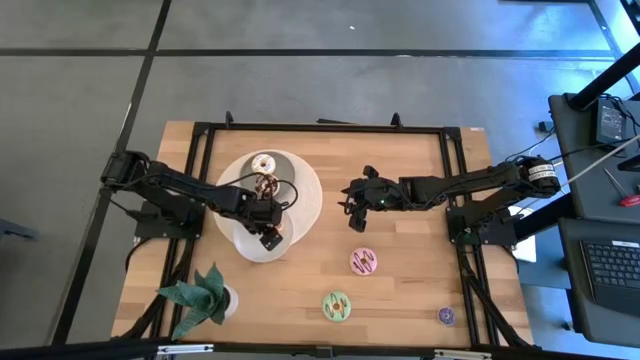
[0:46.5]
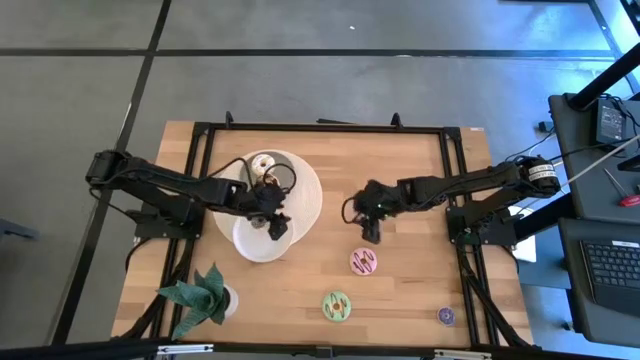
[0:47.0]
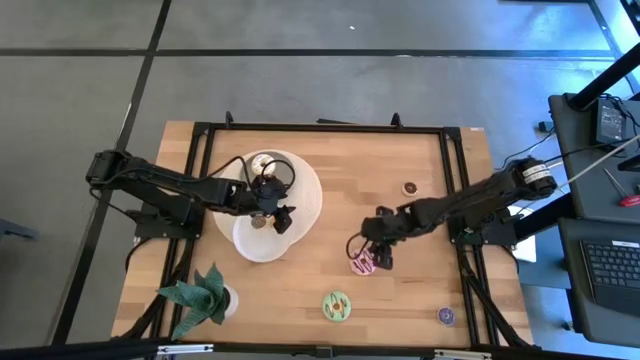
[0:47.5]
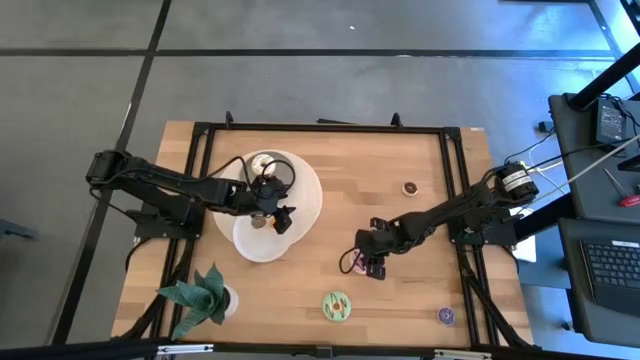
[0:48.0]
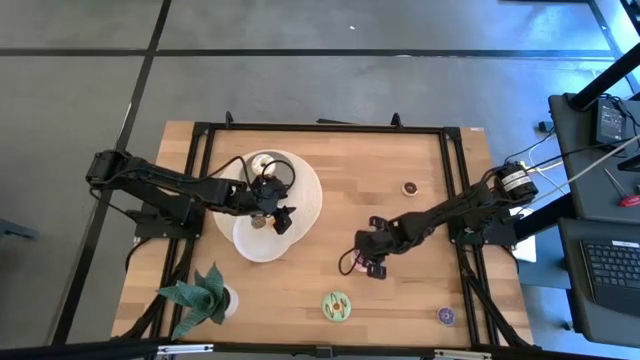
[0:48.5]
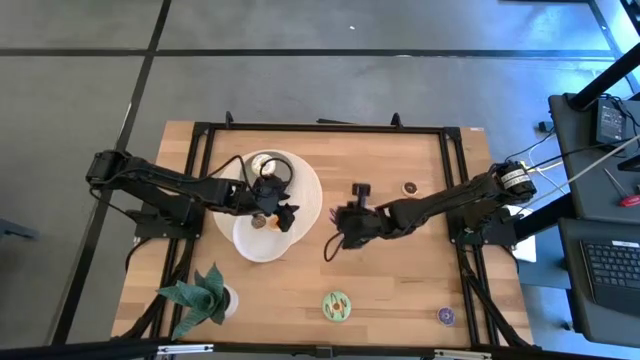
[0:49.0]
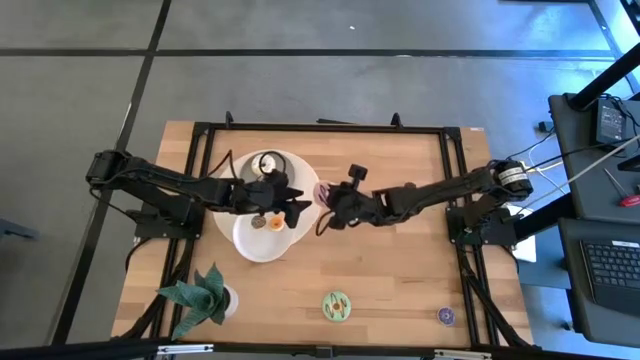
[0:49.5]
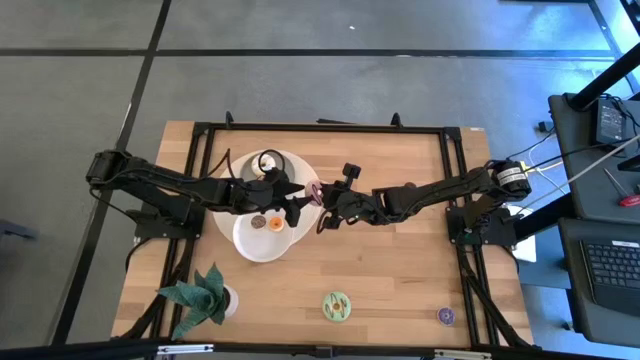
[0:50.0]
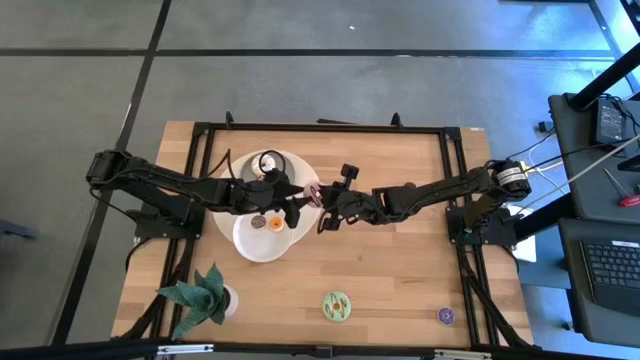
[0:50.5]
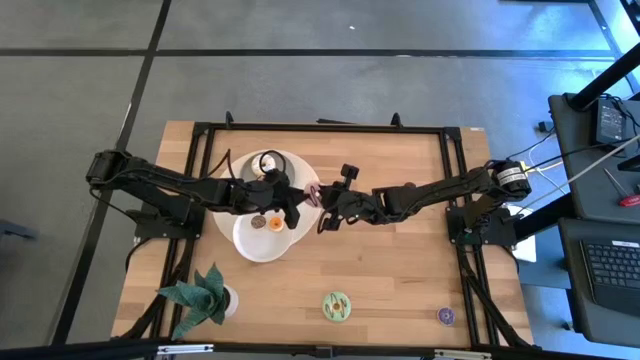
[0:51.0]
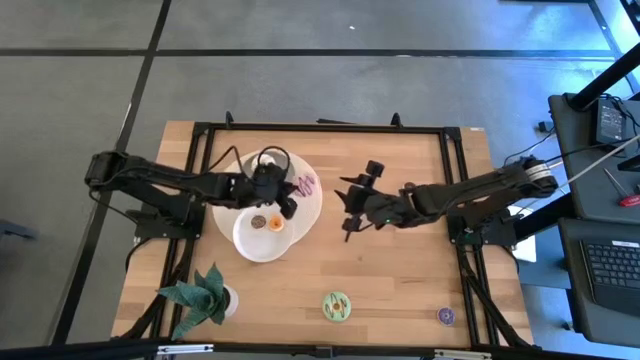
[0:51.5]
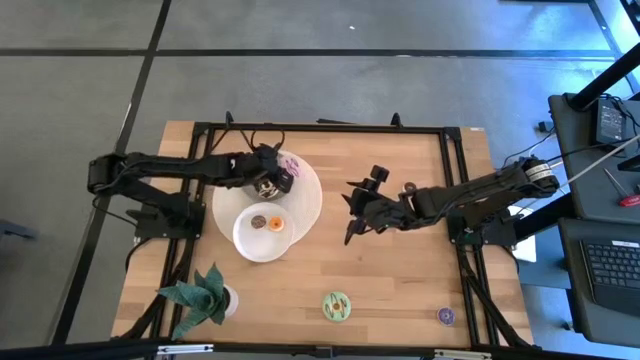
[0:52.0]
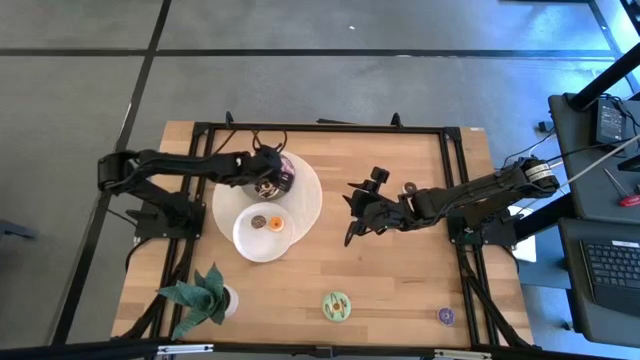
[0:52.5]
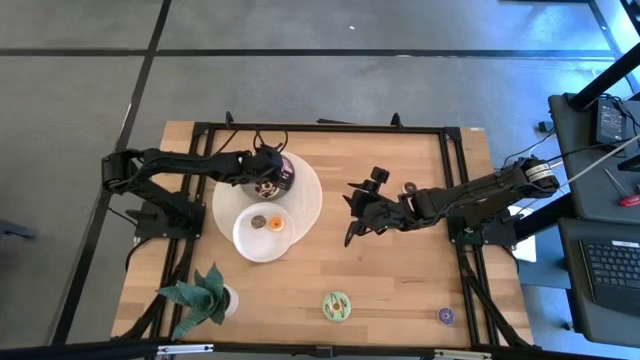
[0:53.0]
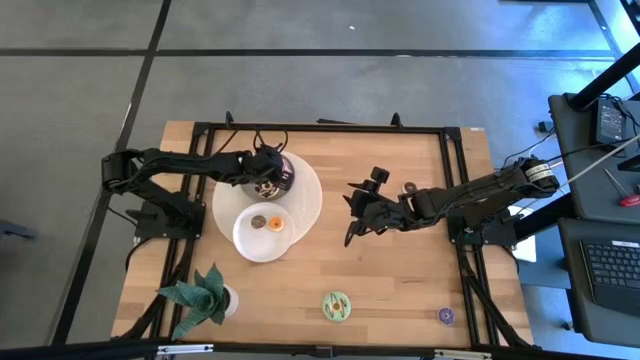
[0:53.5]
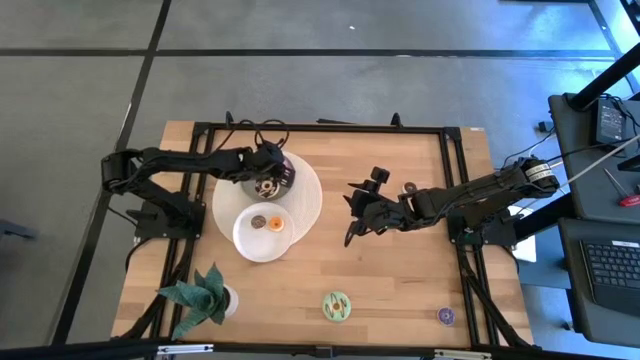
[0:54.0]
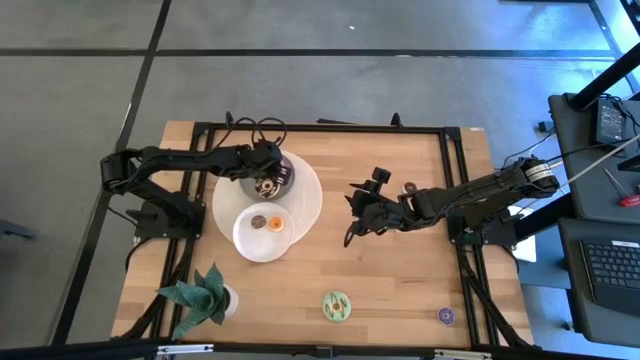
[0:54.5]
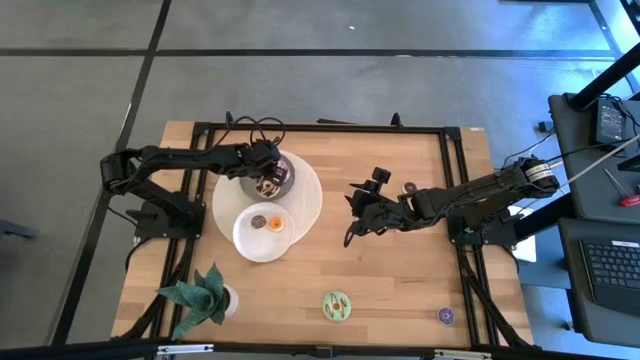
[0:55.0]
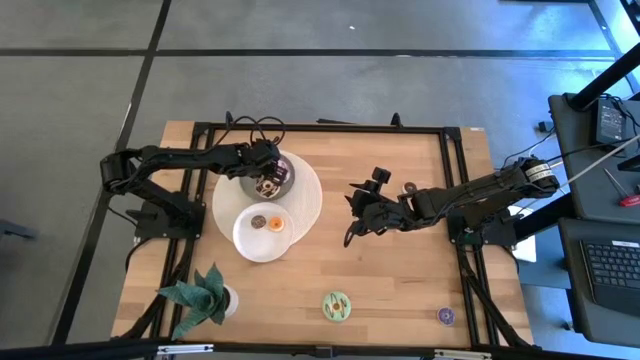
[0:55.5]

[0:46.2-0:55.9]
Task: Pick & Place donuts
Put the big purple donut on the gray plate

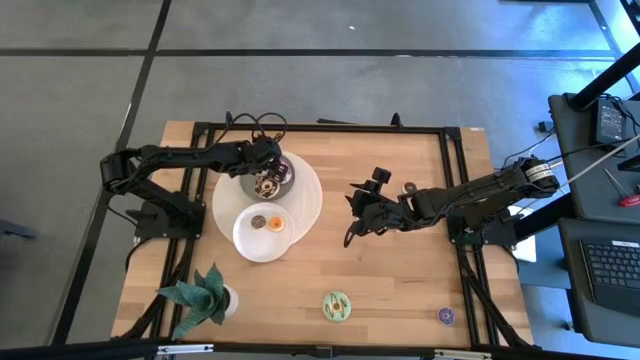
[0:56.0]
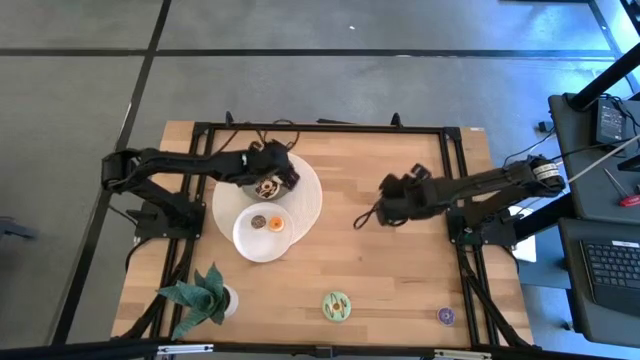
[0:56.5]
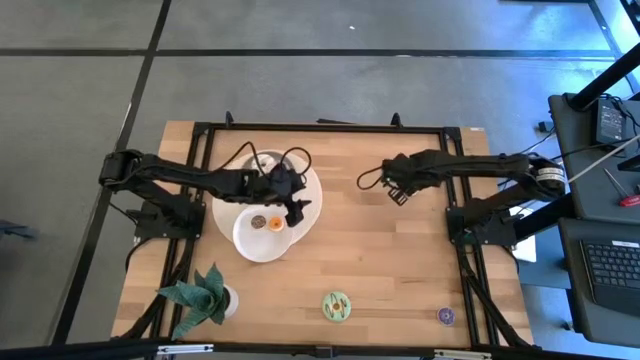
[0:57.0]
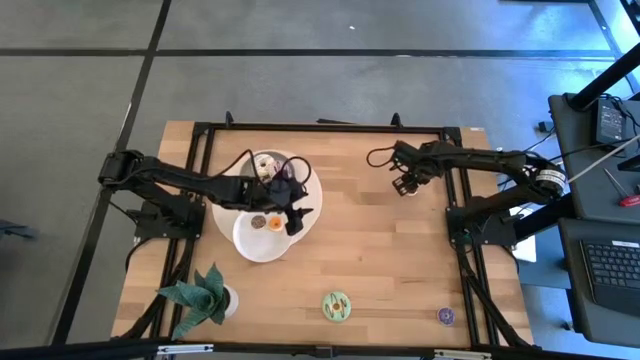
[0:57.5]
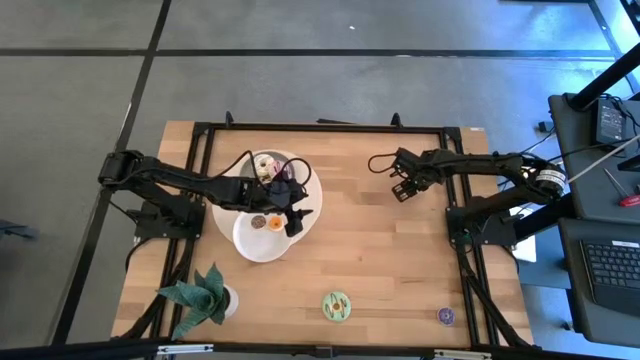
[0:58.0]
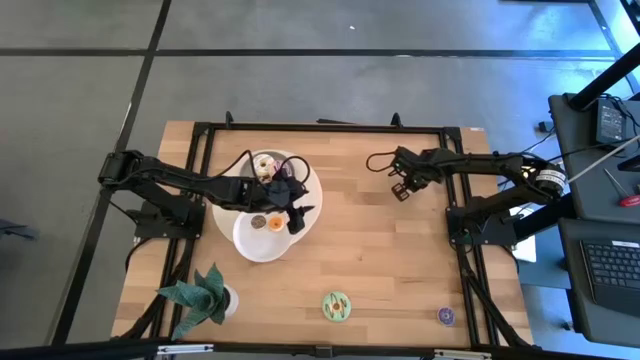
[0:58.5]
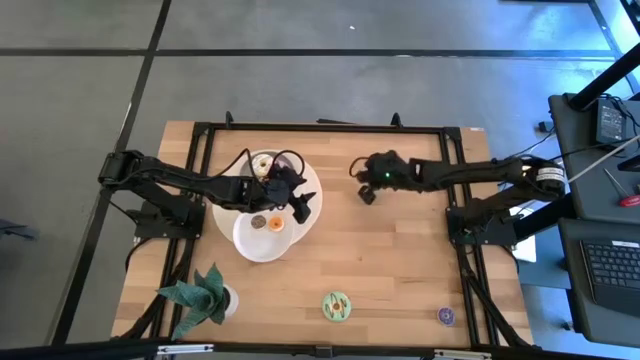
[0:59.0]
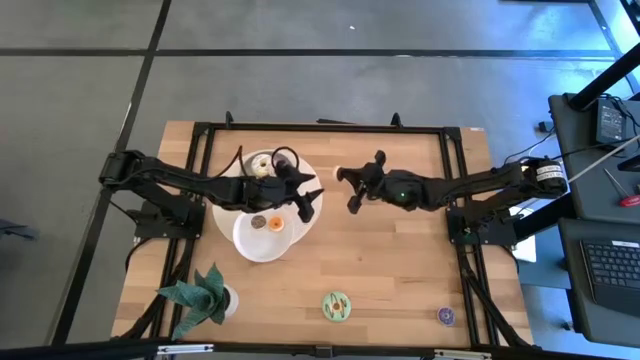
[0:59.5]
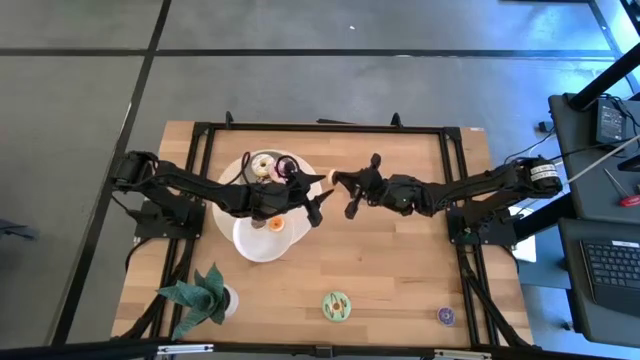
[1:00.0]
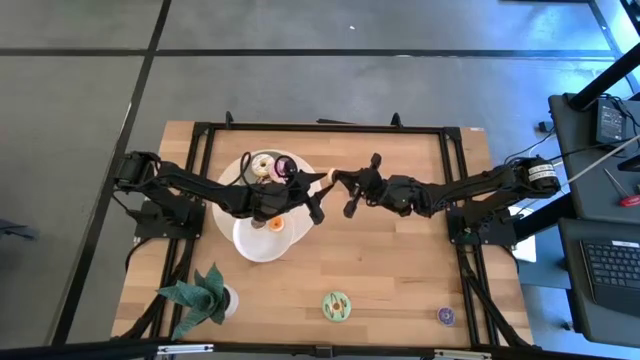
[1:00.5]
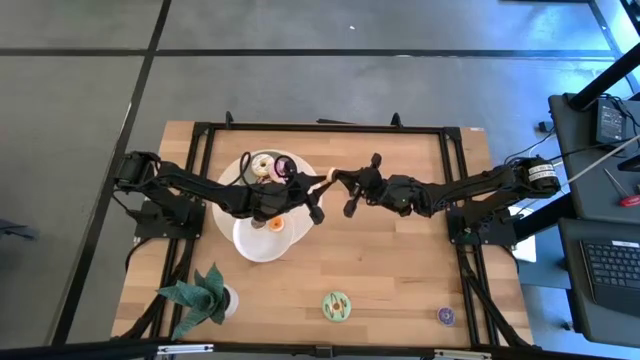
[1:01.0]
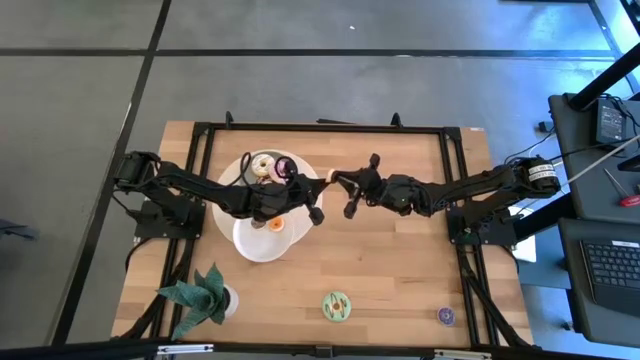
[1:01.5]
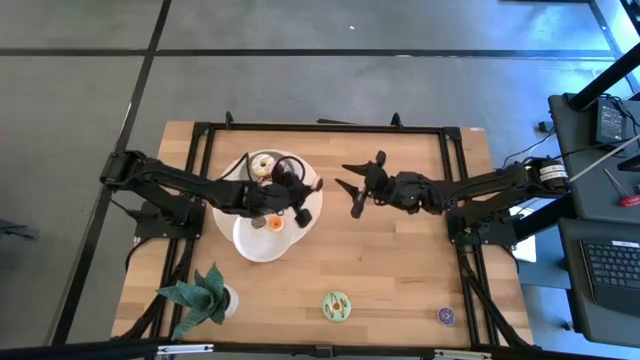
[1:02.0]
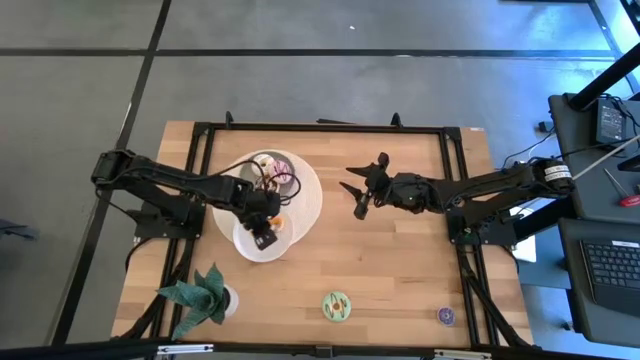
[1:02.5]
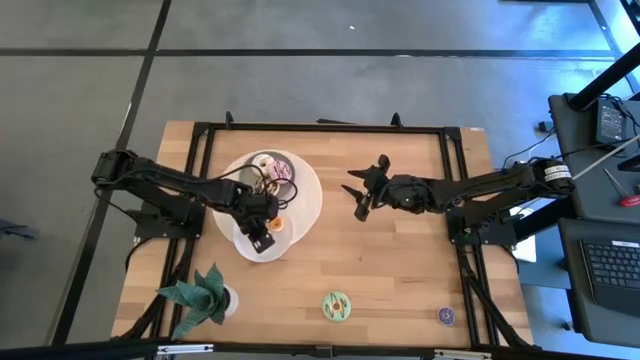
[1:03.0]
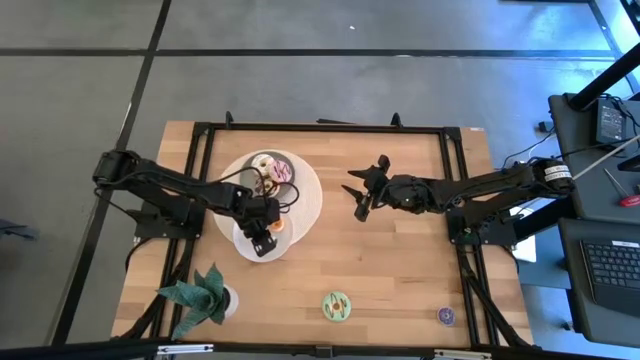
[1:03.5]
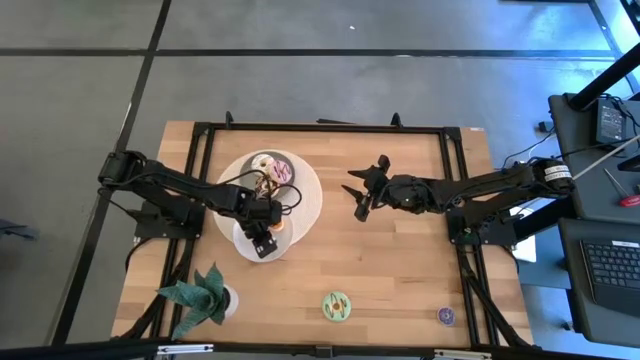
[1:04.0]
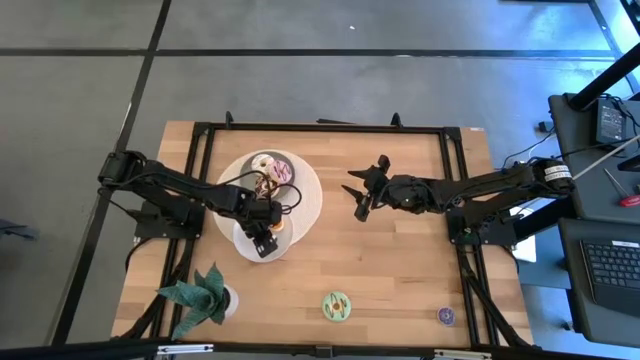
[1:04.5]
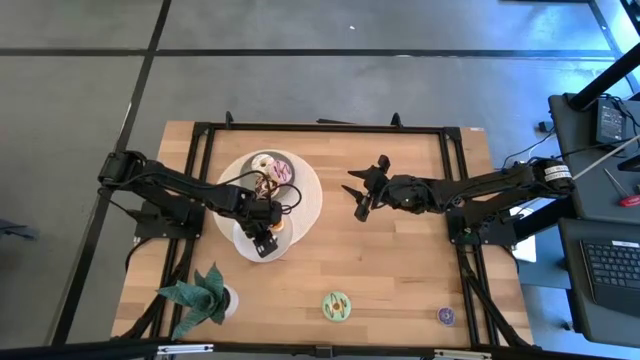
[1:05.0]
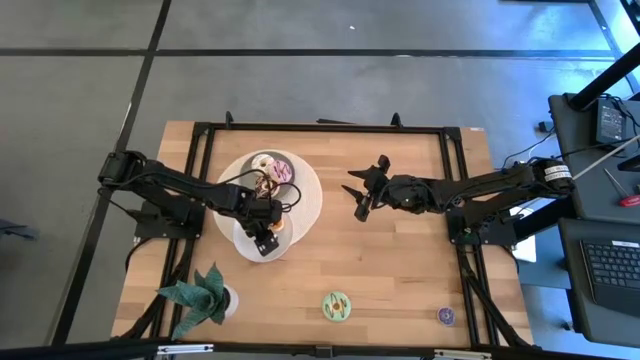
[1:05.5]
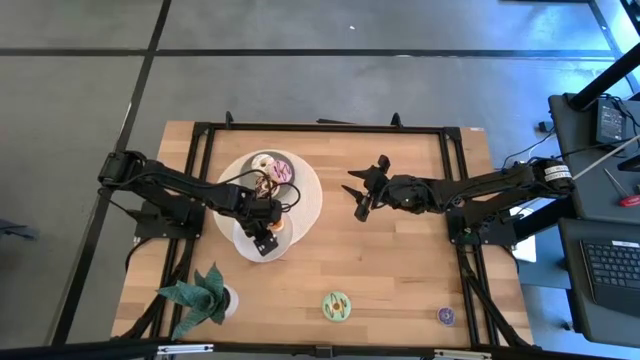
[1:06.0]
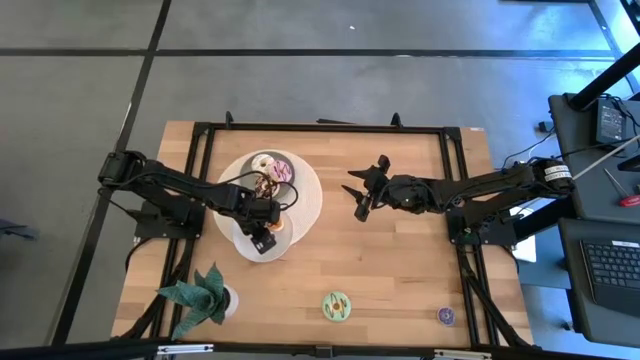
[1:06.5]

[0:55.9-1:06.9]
Put the small dark brown donut on the white plate
